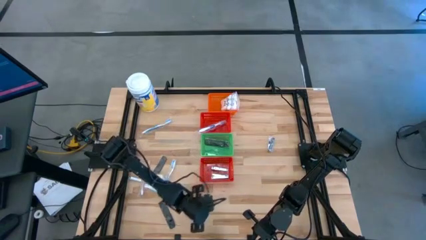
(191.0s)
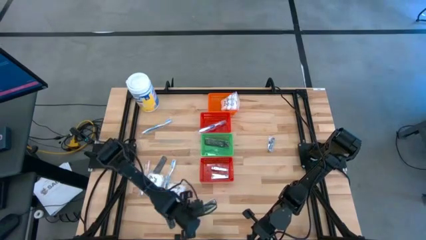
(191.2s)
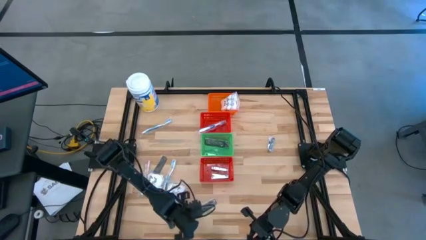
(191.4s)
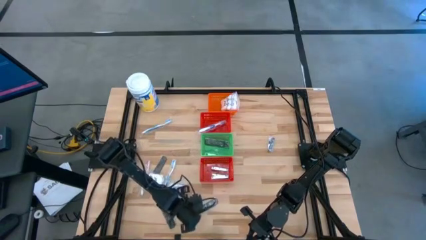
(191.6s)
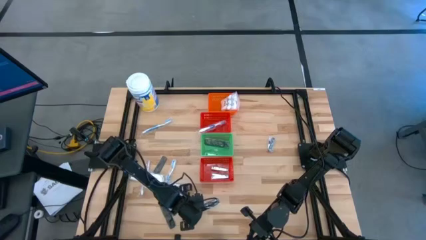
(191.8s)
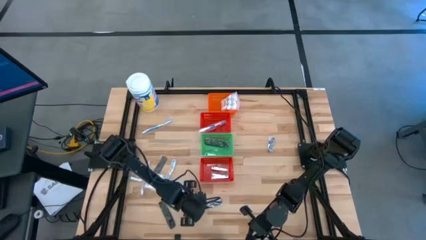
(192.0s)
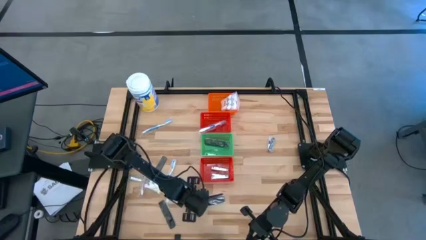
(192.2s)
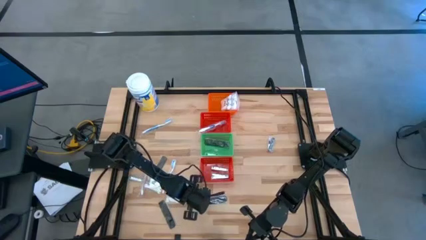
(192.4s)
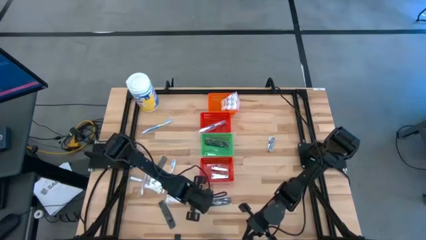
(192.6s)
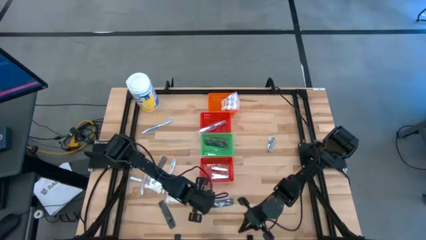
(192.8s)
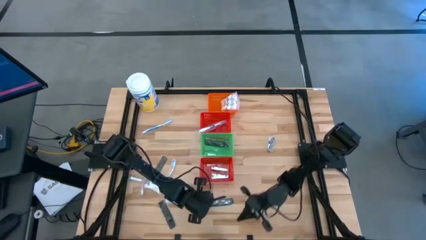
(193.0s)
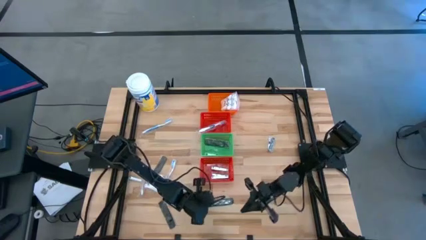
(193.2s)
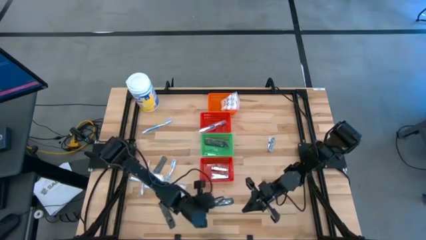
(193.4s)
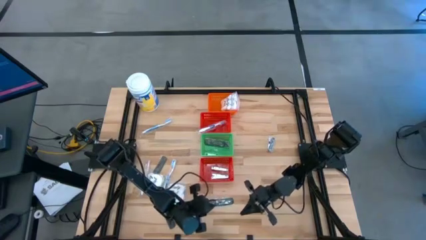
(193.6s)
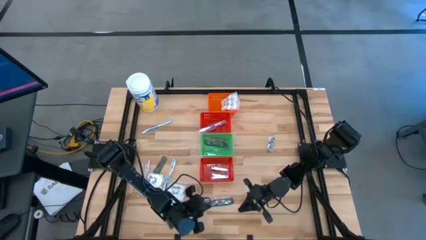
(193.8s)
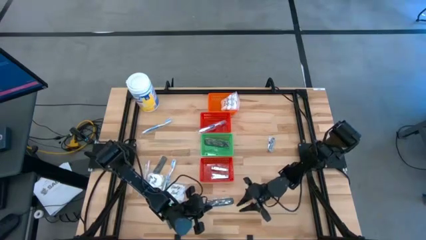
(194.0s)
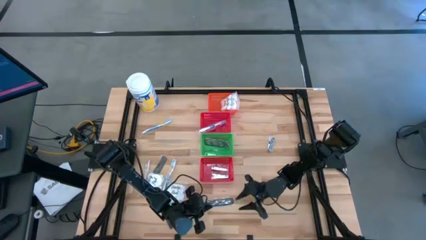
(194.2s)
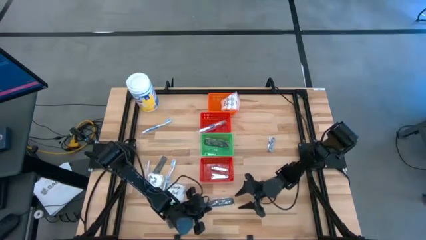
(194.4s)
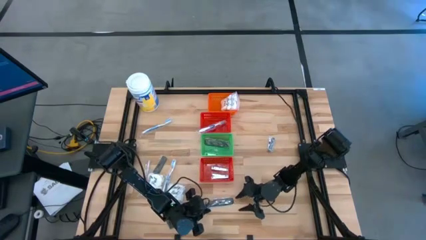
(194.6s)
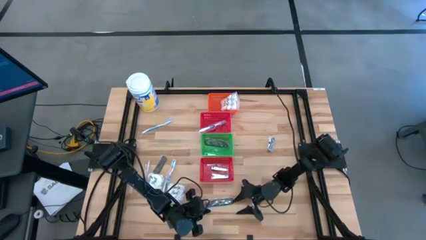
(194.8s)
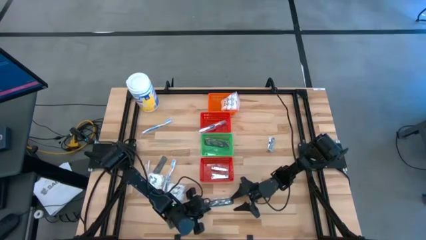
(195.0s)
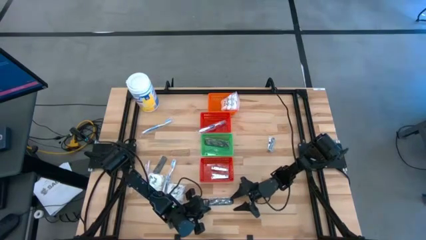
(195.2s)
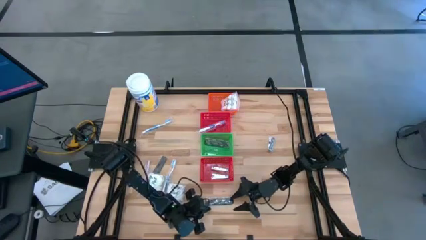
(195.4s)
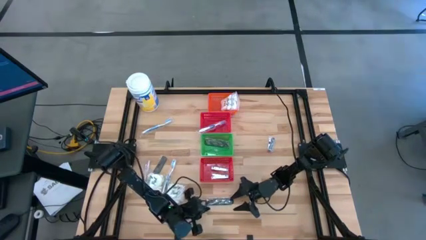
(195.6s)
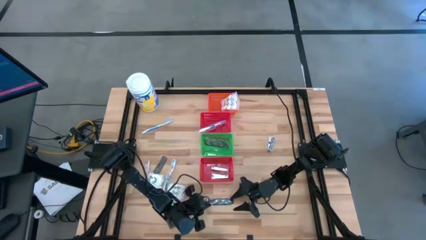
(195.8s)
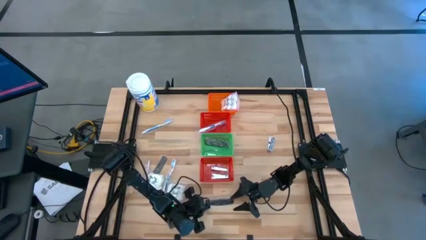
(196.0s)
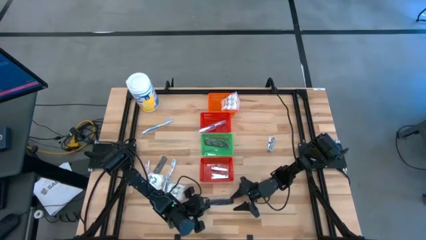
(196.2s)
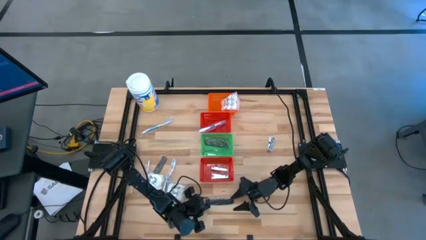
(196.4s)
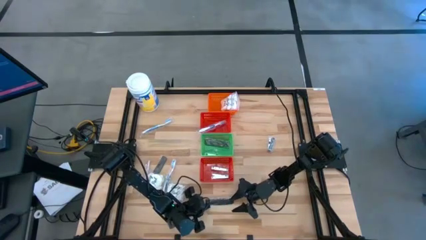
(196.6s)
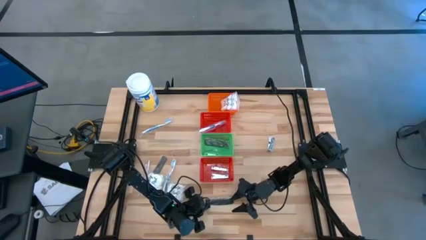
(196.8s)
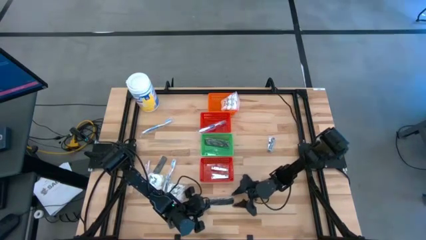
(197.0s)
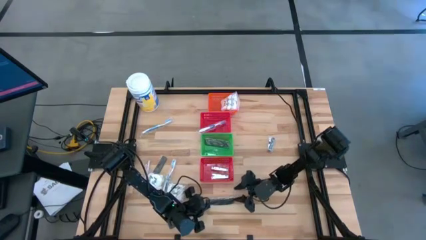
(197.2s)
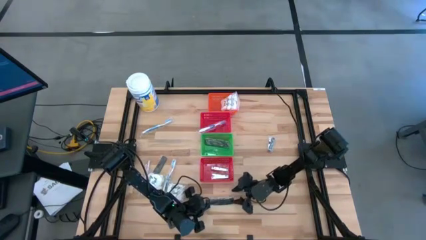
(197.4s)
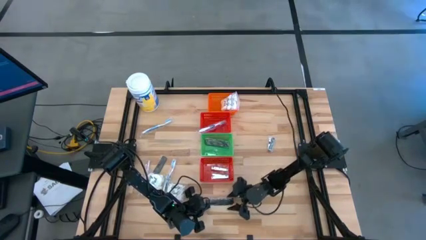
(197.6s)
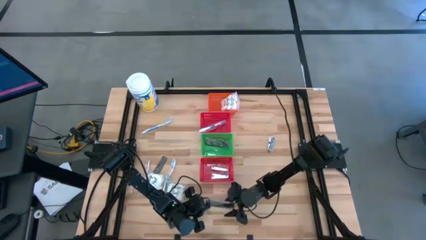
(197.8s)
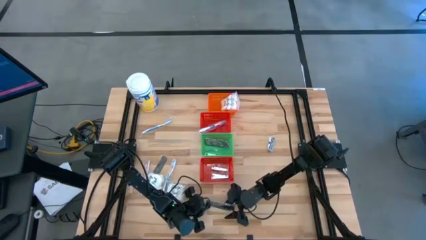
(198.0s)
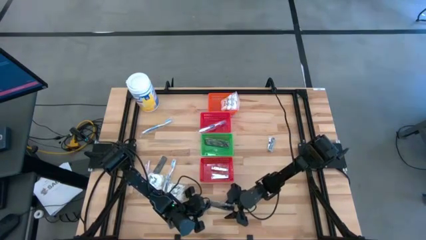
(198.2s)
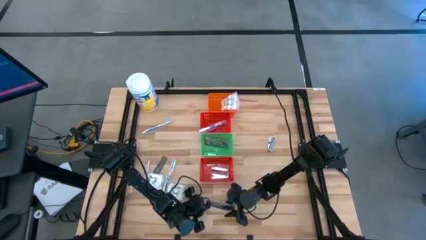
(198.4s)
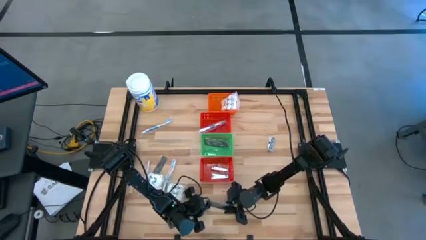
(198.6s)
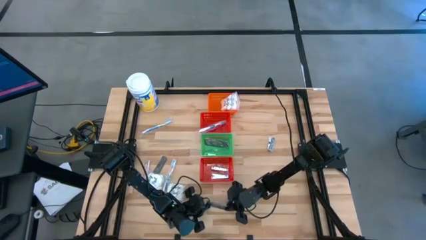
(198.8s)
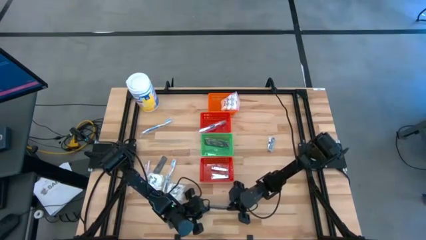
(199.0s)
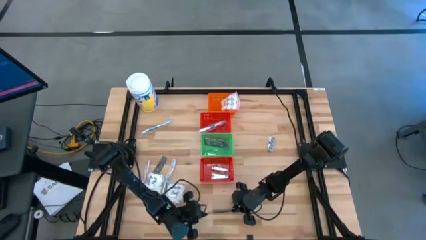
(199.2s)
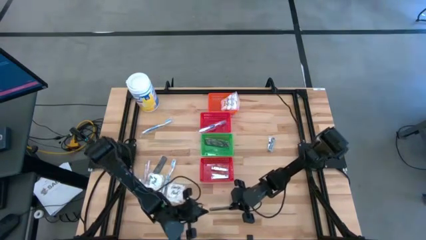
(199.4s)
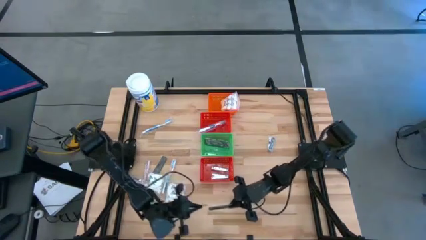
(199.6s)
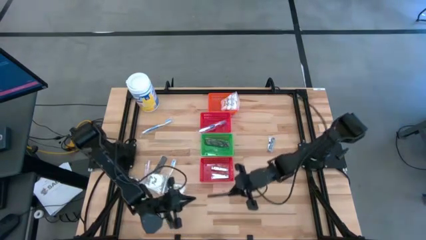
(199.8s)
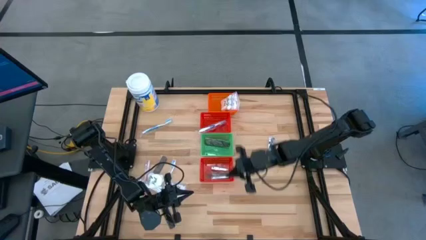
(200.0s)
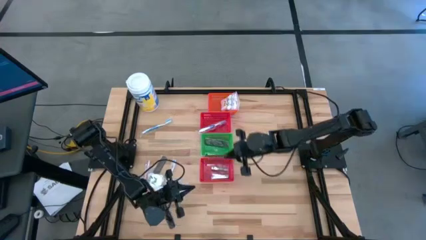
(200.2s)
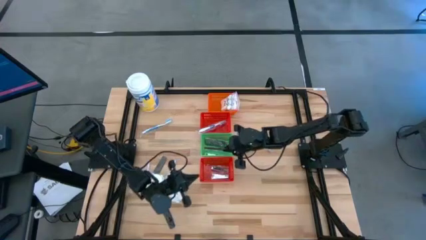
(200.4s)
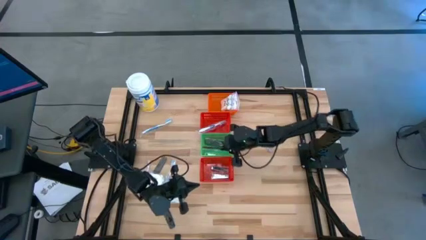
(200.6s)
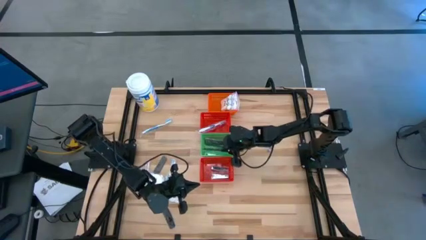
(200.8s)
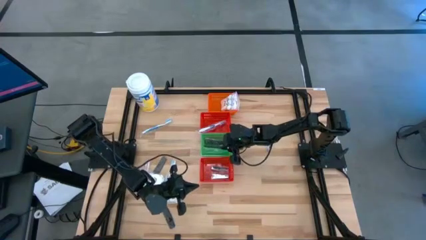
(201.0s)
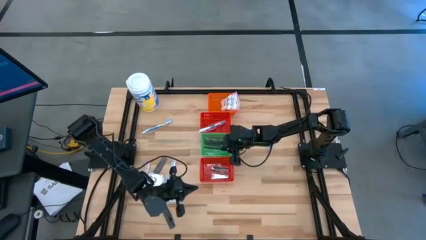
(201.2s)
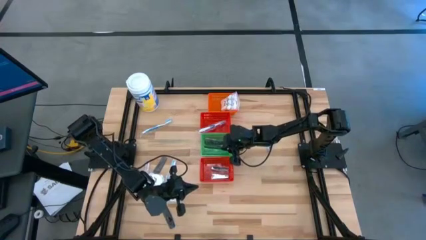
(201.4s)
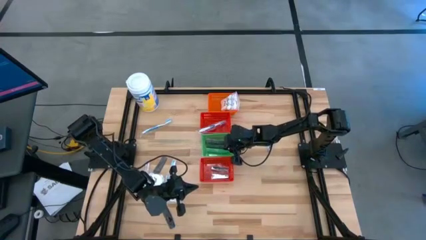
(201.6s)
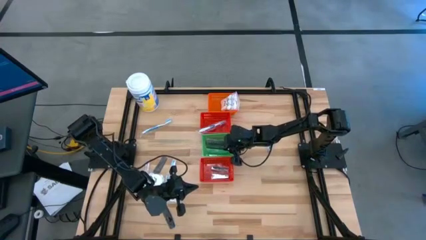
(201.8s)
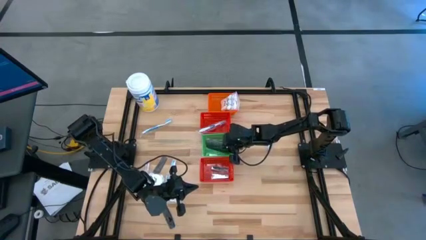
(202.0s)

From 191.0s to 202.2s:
Task: Pick & Place Travel size toiletries
Put the black comb into the green basket

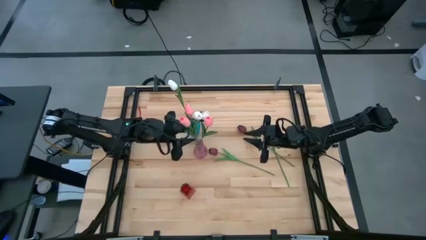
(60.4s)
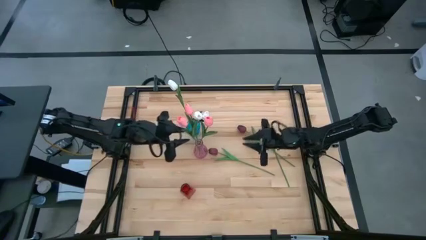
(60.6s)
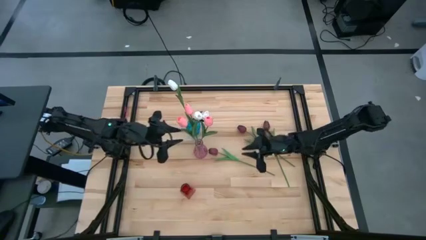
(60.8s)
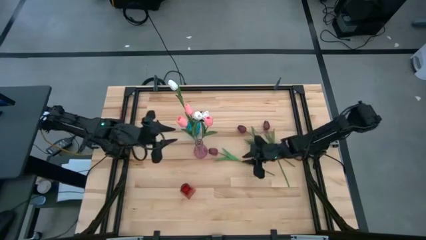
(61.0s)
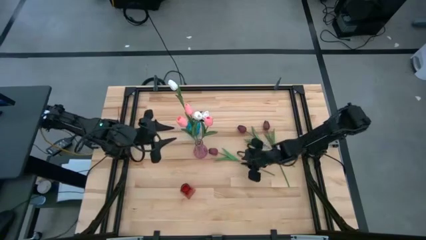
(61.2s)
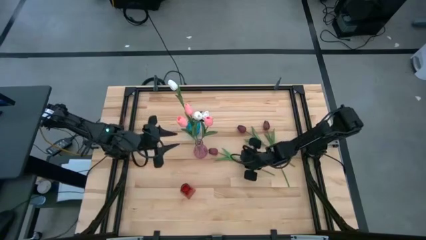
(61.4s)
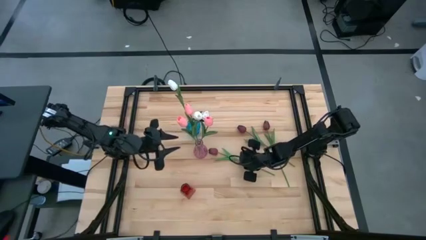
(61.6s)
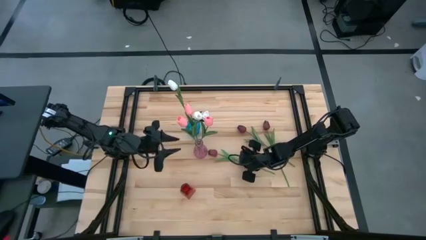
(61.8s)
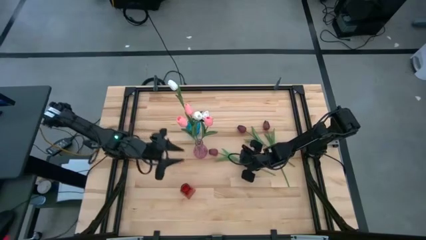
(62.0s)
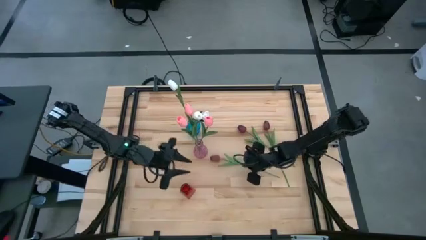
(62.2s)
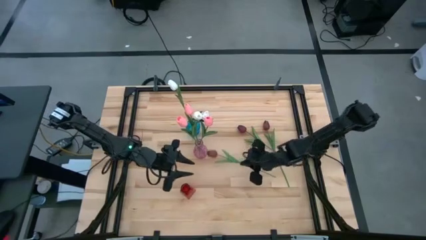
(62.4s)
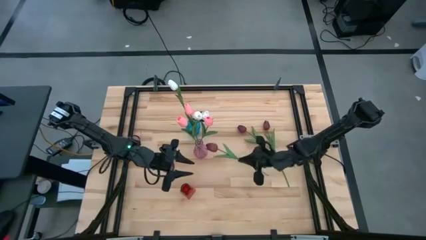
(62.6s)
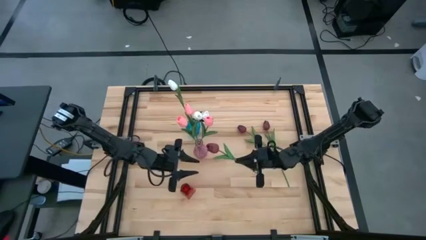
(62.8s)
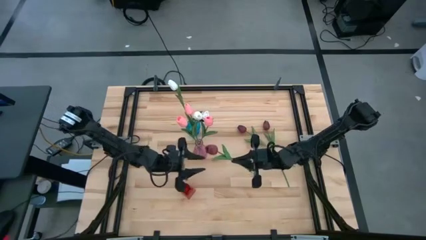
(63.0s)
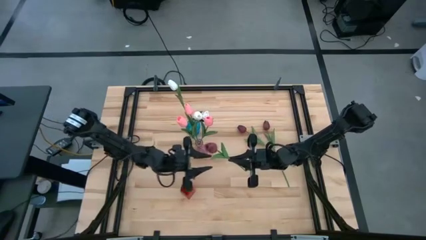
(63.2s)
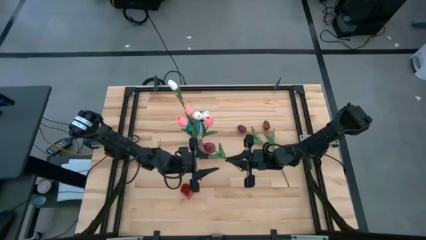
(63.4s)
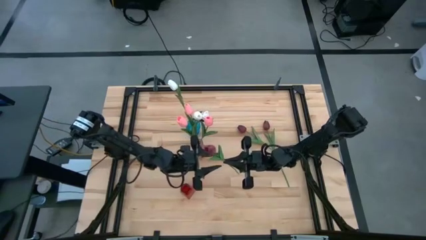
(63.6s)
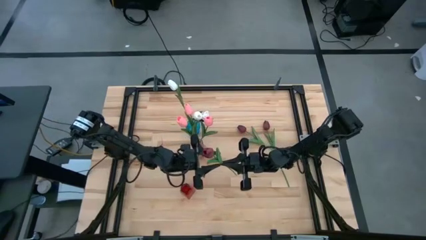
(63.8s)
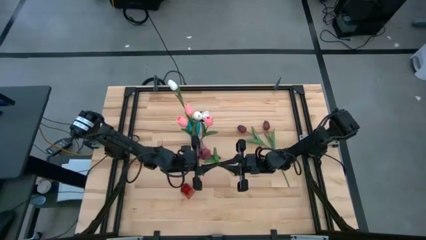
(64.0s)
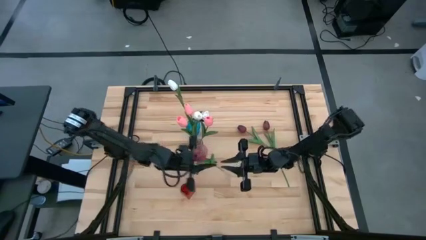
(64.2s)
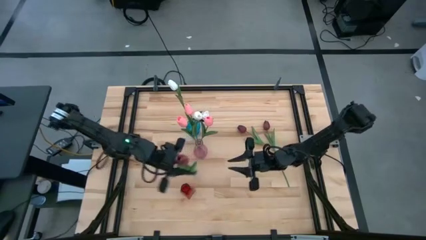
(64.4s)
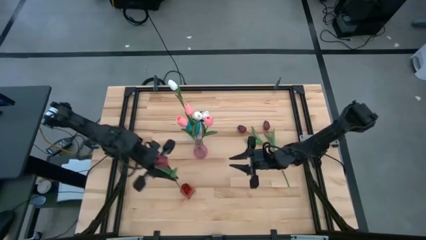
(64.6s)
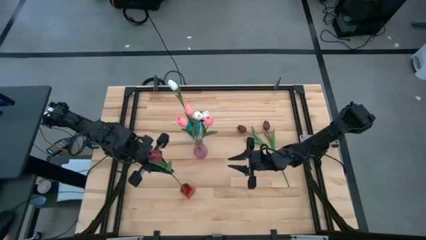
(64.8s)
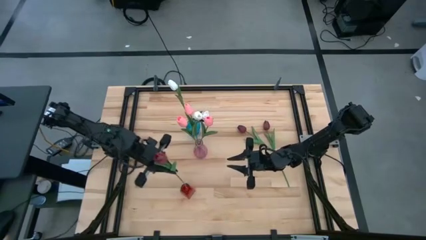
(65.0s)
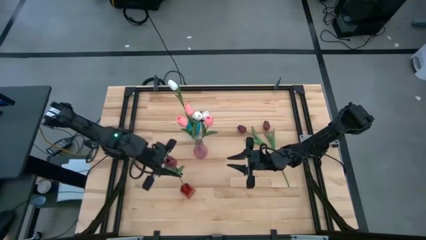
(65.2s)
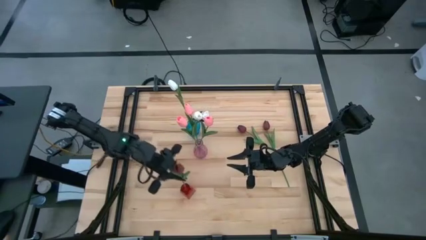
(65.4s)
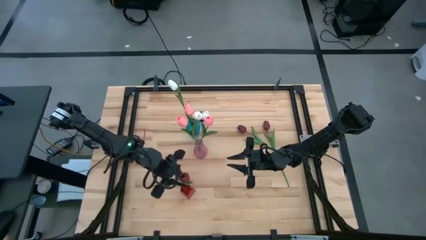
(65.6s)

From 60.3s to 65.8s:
Task: Sort flowers into vase by color
Put the bottom red tulip into the red vase

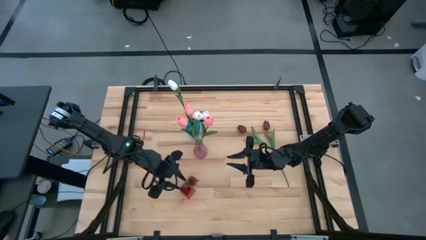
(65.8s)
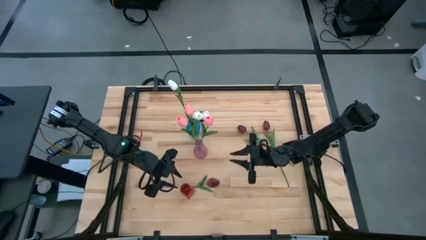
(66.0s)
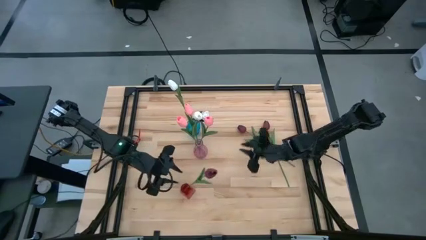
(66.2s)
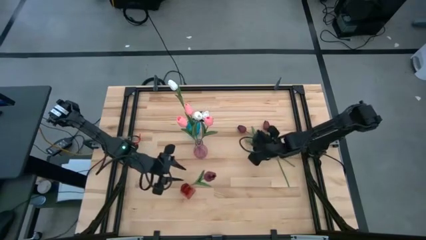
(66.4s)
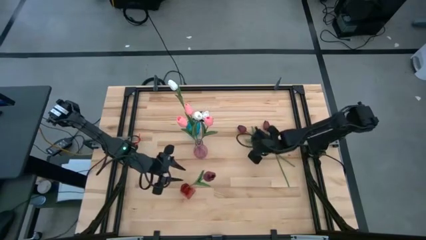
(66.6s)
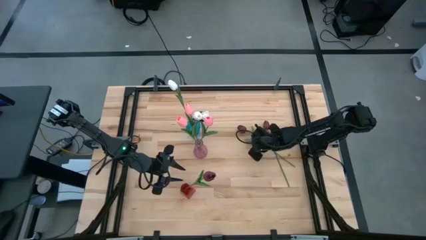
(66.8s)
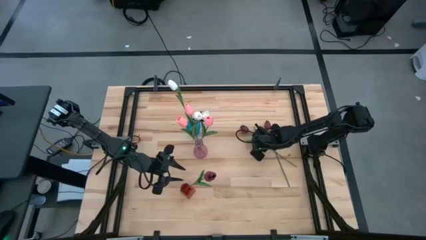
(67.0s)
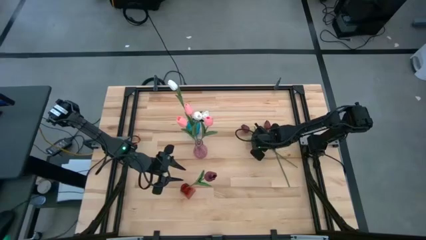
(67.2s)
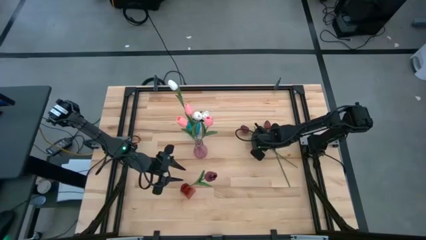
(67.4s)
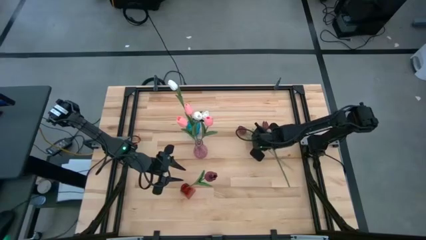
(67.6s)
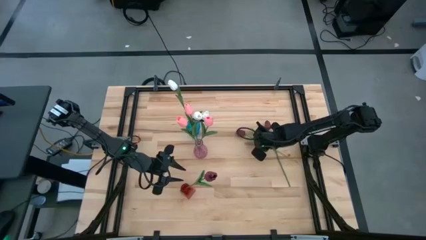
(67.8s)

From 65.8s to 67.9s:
Put the left red tulip into the red vase
